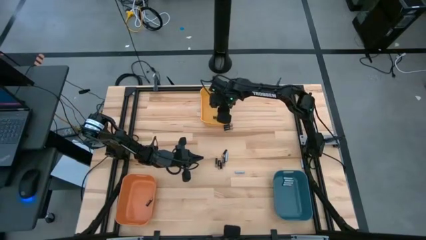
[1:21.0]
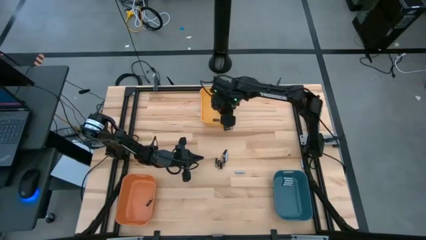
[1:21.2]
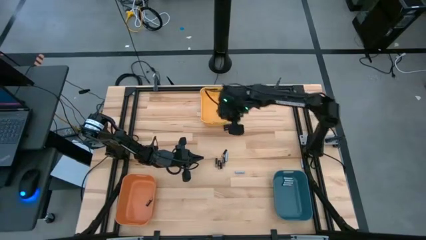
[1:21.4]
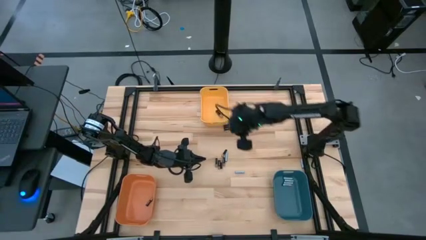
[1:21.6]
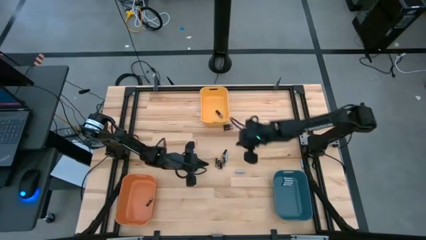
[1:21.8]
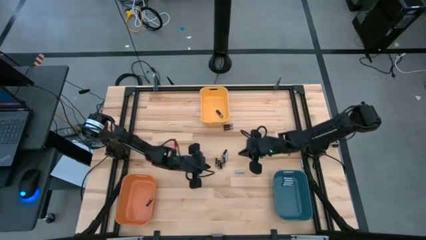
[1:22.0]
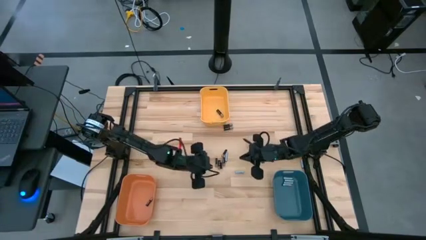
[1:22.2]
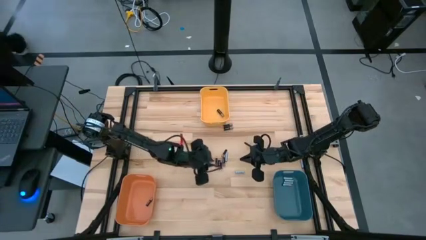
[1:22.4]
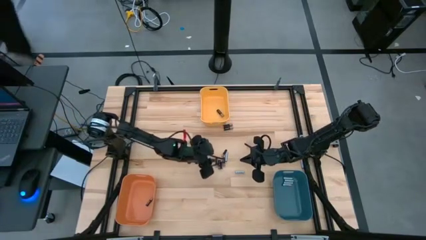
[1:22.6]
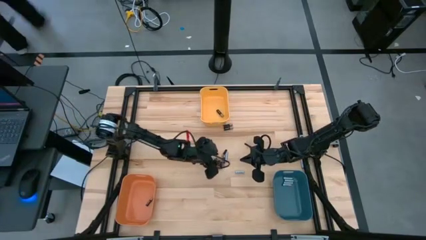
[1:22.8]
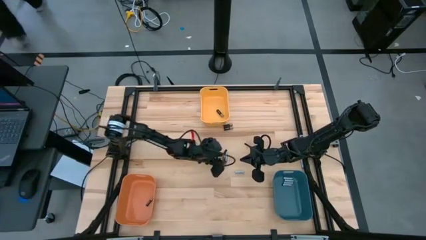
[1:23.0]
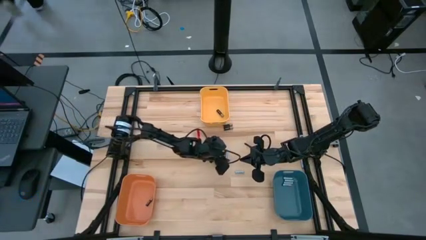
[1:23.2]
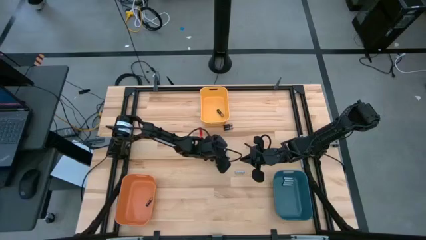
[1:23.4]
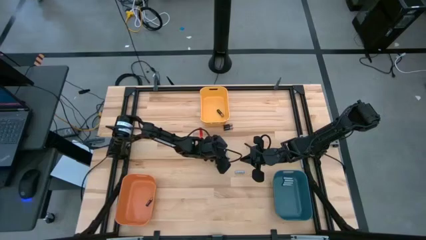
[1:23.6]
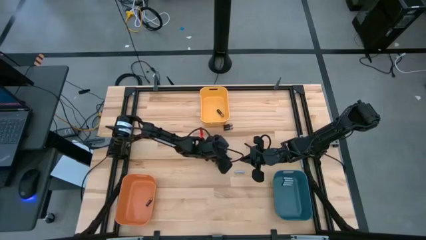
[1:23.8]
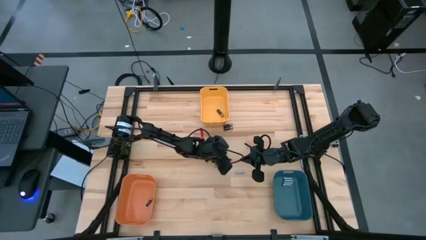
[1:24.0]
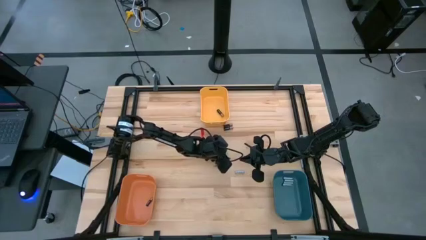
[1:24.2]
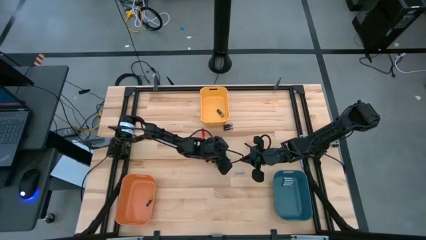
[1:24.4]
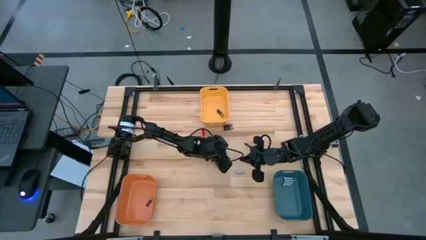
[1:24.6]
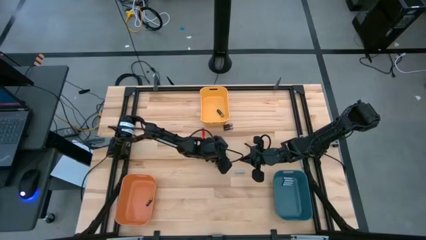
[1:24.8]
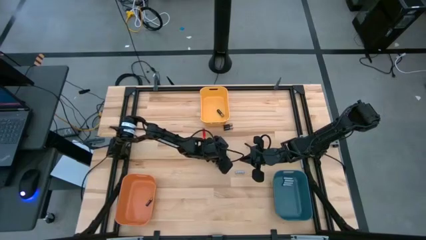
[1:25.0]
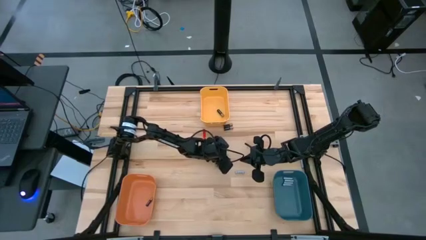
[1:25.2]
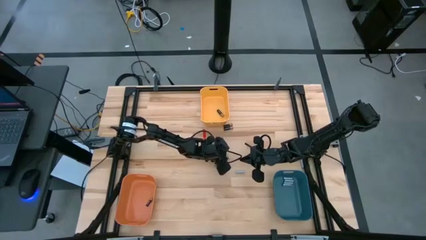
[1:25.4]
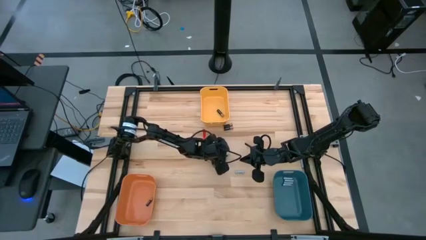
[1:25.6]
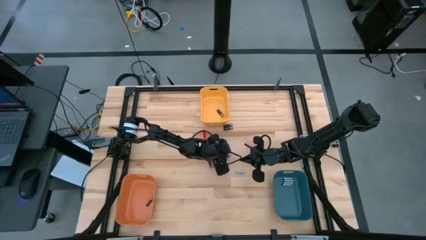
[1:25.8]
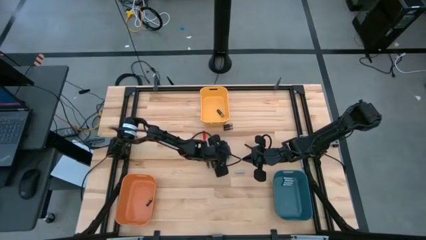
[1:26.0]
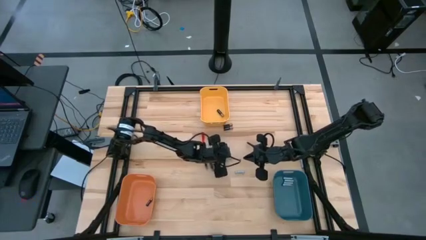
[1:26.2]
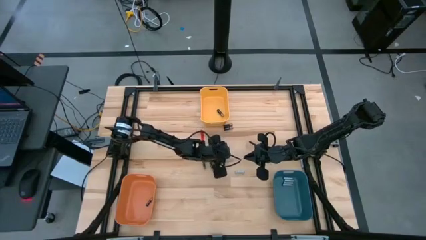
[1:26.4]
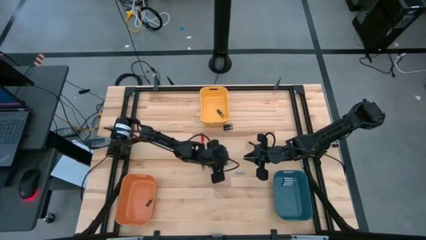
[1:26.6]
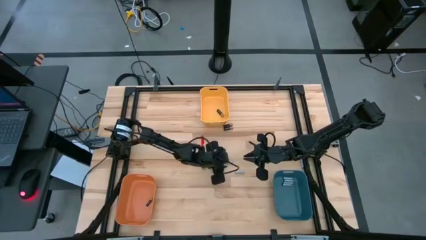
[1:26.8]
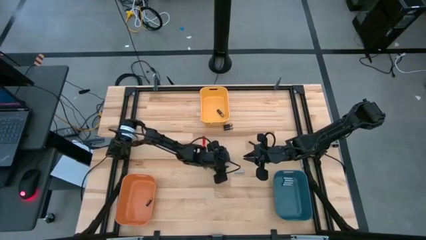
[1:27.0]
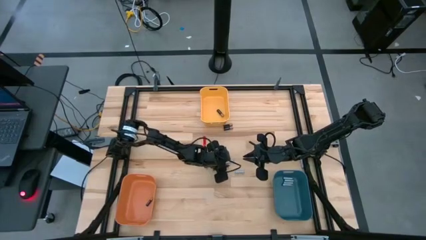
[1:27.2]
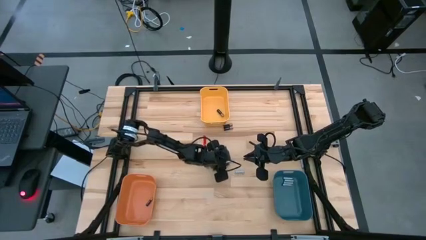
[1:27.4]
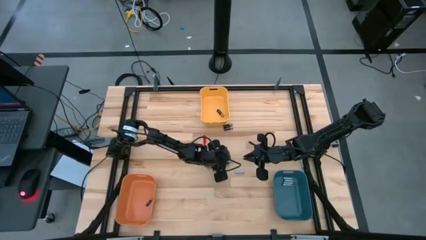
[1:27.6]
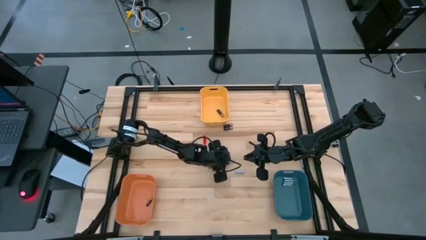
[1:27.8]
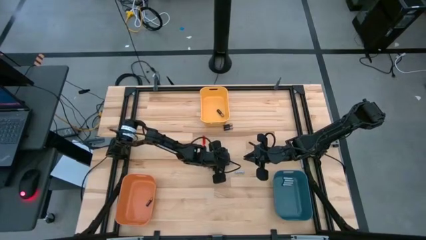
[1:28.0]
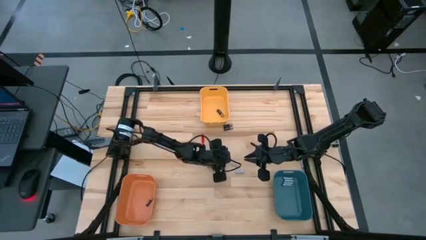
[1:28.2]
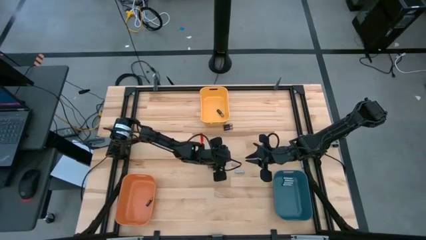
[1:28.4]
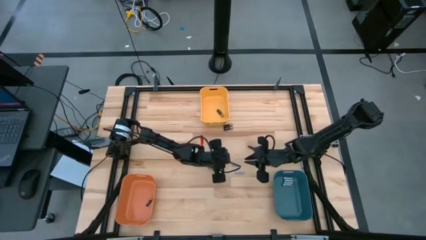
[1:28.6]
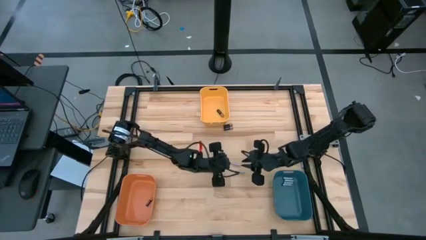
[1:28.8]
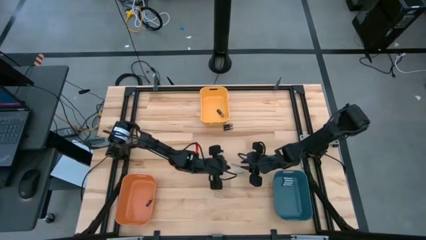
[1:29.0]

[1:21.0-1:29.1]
Task: Sort batteries
Put the white battery into the blue bin

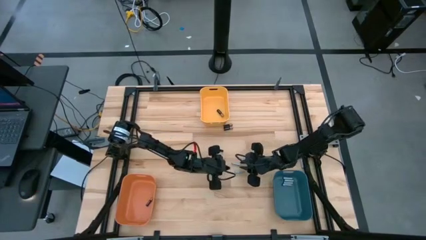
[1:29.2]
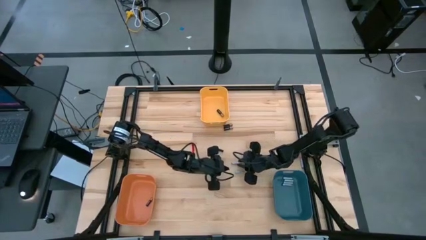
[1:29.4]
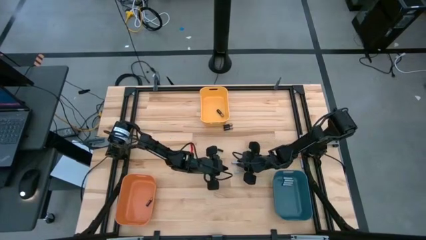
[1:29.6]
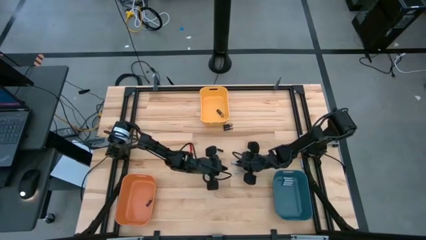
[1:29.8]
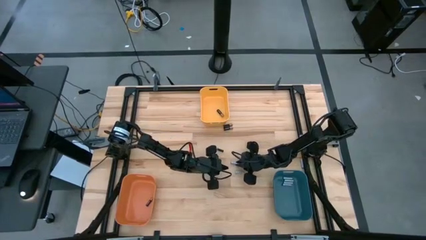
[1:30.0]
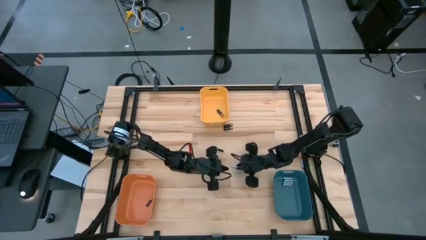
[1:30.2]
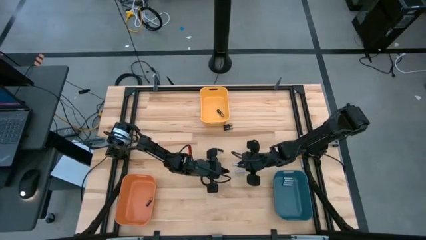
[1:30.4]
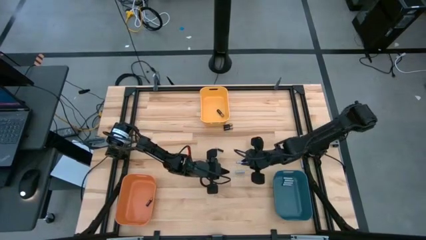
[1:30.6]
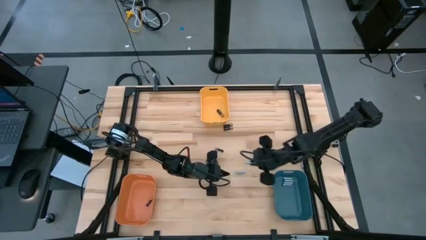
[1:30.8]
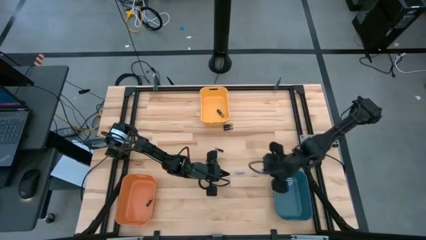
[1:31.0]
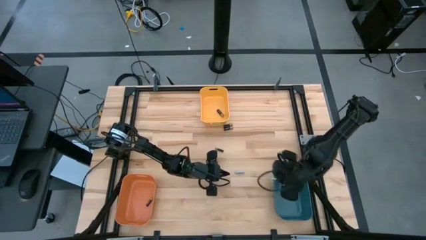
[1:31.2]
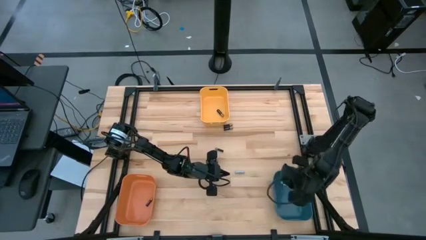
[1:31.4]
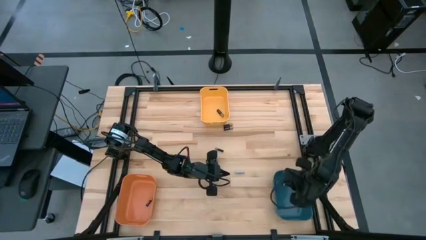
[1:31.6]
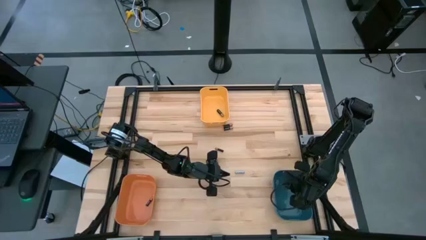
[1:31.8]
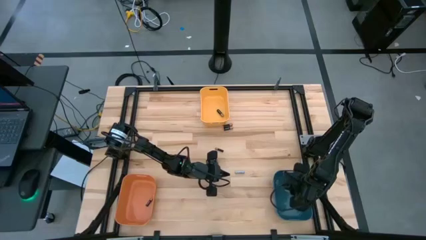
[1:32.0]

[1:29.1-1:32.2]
Put the white battery into the blue bin

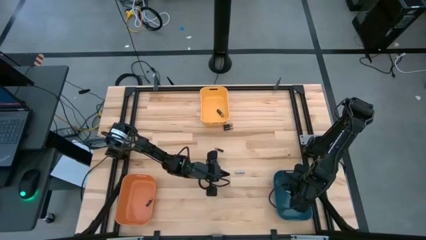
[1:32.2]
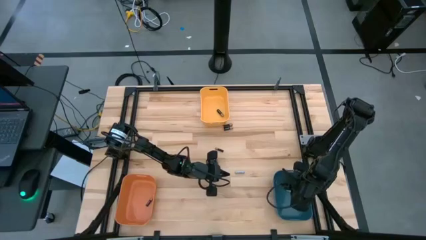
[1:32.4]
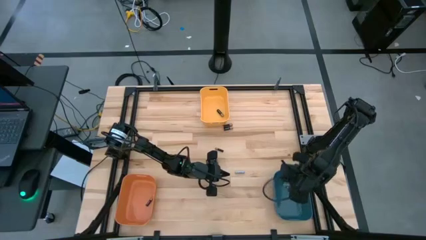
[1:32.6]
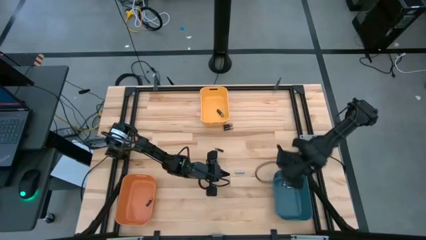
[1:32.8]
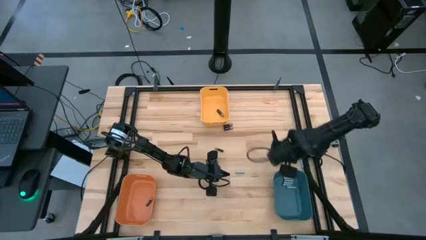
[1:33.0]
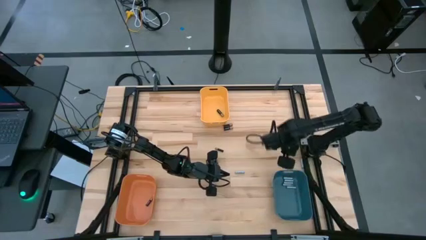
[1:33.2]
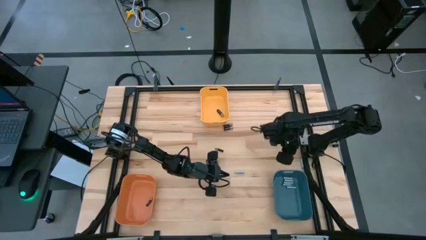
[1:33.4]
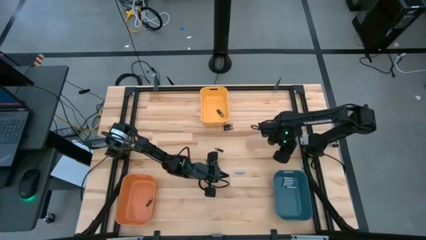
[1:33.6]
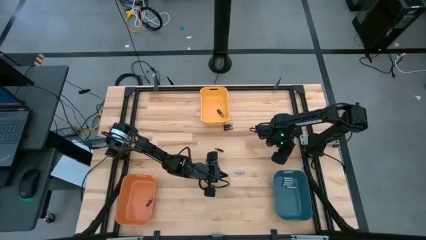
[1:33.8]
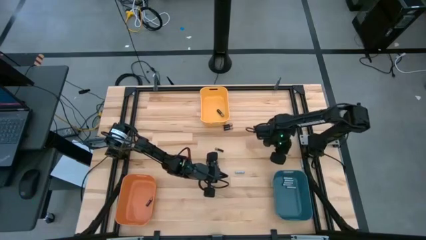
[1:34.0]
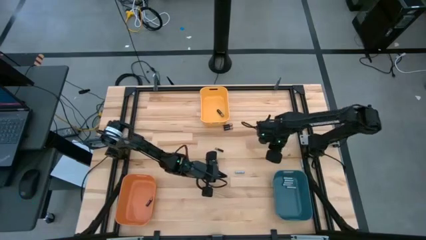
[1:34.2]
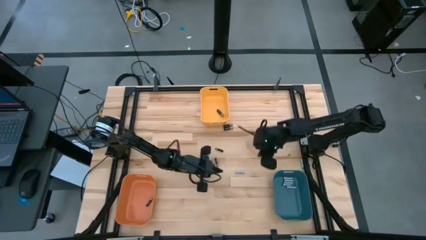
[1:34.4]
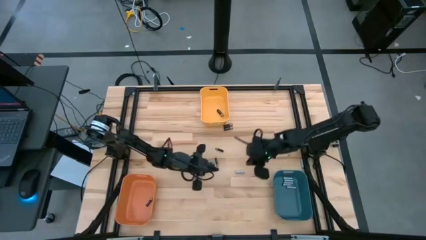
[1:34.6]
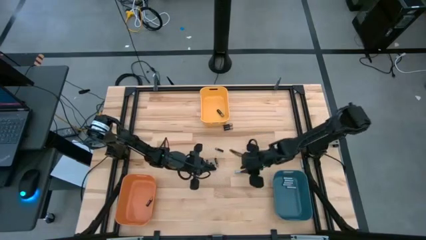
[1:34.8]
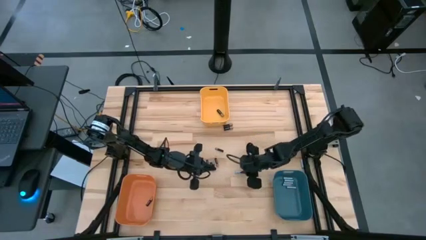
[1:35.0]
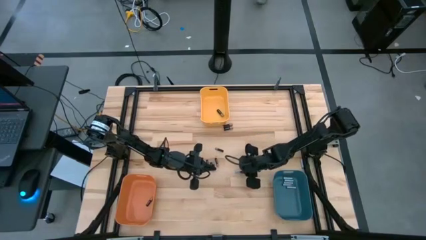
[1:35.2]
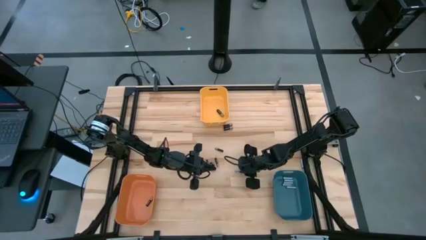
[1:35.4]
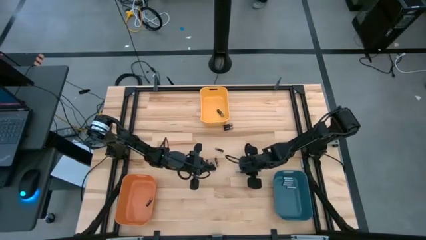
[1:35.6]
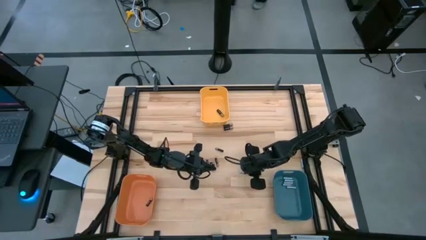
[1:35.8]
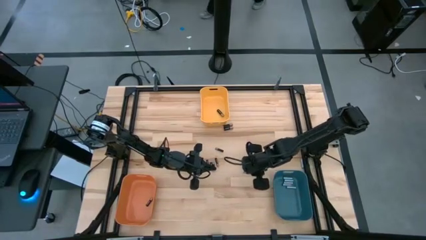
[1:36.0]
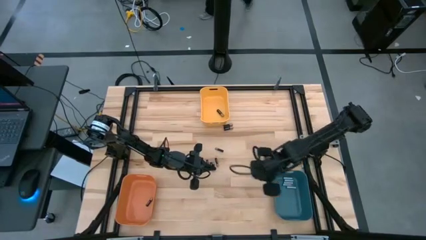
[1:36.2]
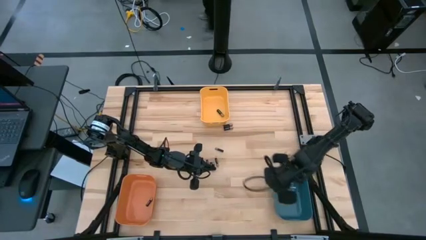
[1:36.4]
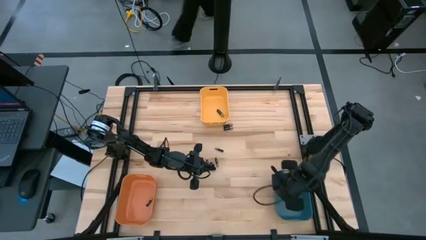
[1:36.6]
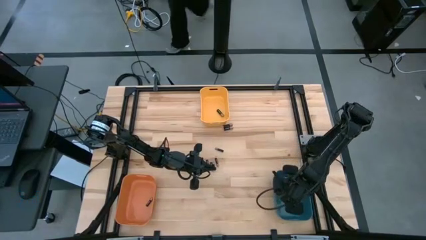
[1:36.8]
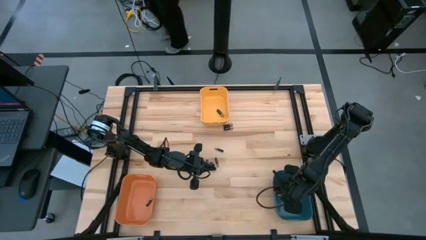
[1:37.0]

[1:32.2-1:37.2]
Put the white battery into the blue bin

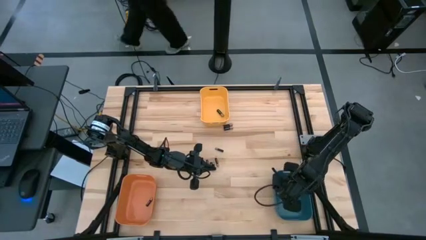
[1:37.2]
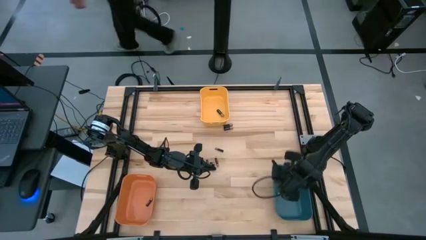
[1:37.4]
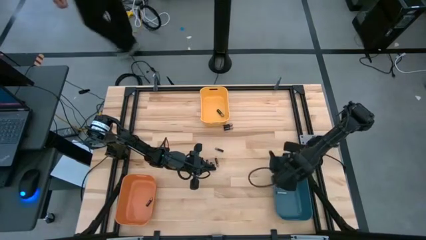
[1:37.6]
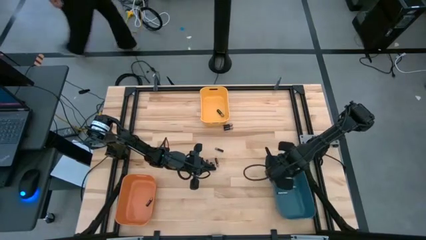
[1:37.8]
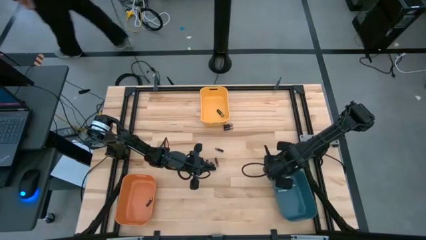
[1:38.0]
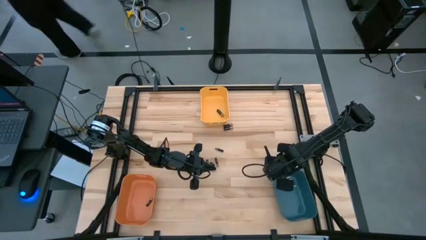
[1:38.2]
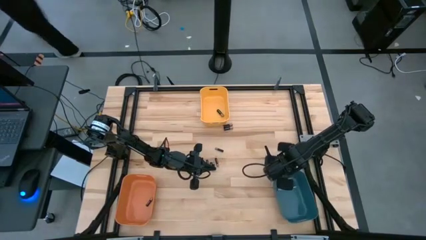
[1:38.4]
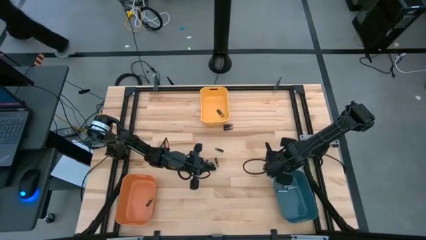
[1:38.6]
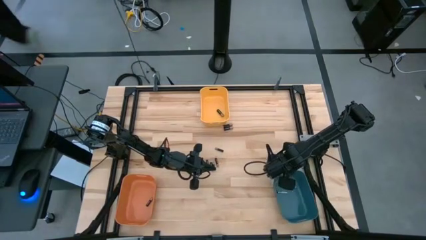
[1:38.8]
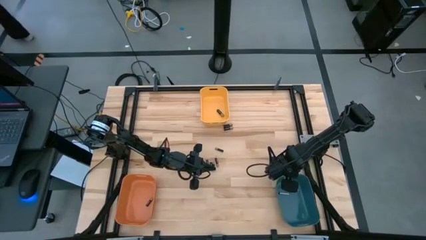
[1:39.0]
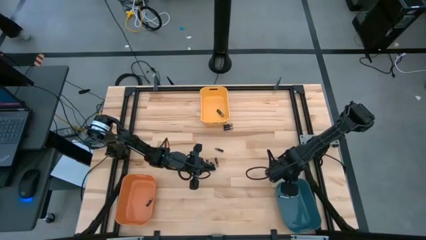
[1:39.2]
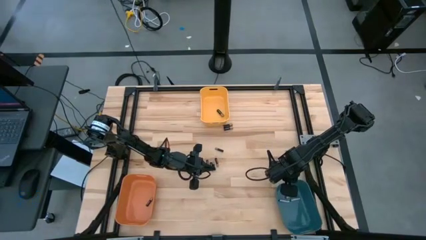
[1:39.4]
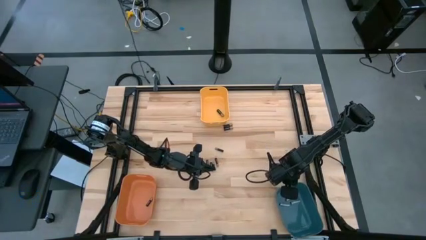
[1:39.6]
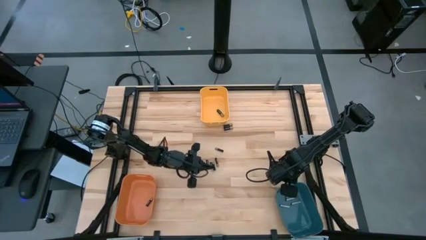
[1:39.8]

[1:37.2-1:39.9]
Adjust the blue bin
